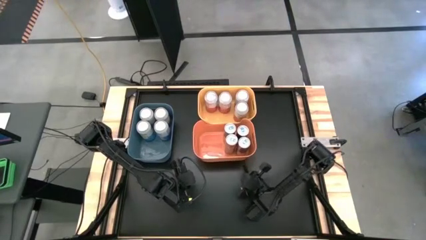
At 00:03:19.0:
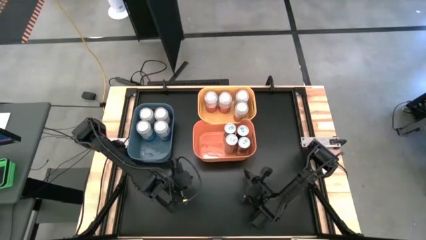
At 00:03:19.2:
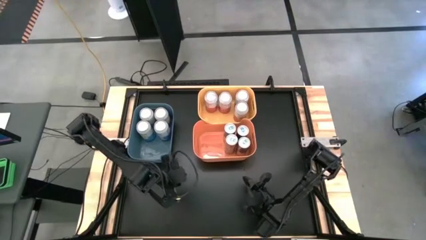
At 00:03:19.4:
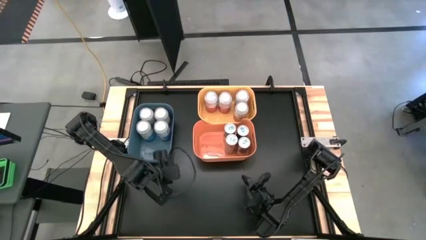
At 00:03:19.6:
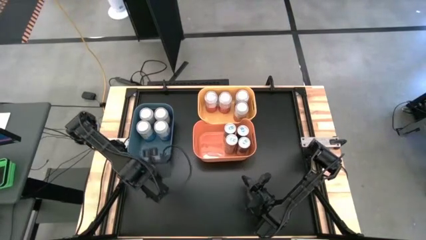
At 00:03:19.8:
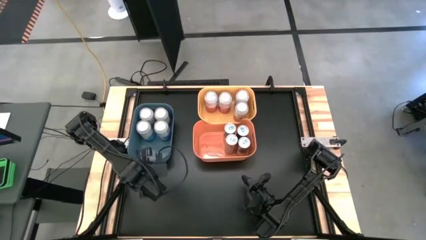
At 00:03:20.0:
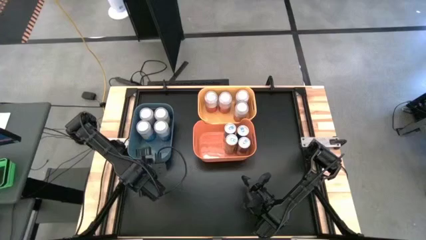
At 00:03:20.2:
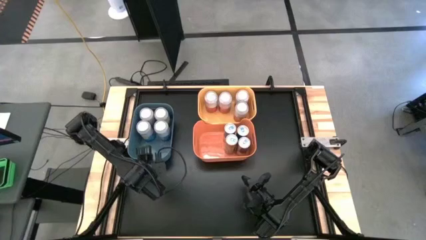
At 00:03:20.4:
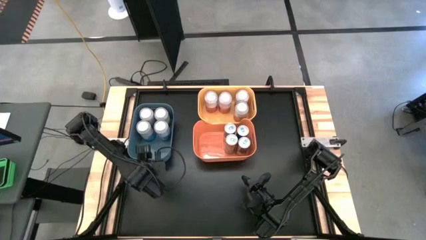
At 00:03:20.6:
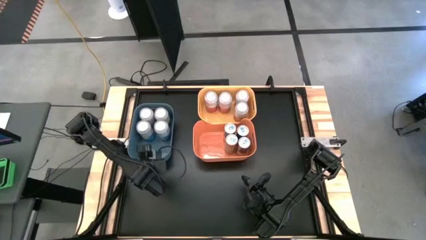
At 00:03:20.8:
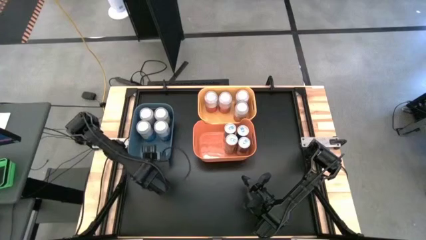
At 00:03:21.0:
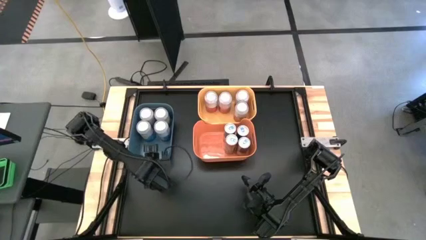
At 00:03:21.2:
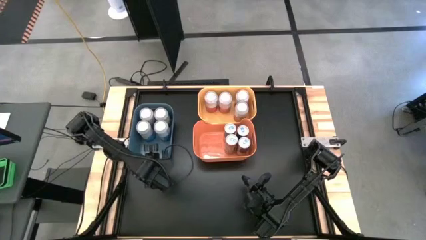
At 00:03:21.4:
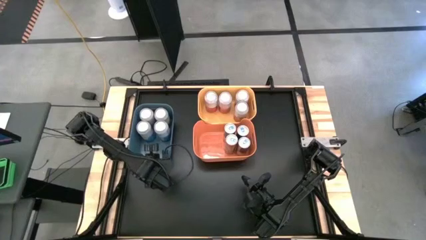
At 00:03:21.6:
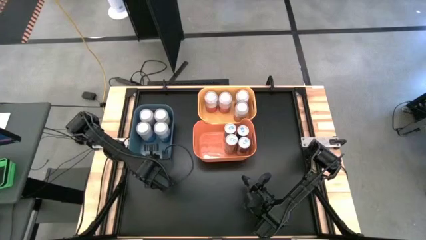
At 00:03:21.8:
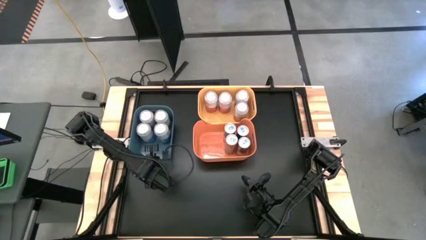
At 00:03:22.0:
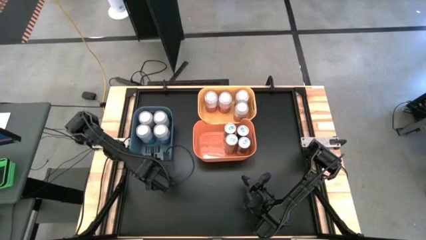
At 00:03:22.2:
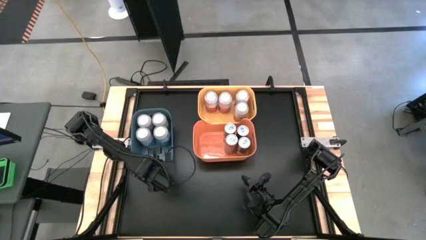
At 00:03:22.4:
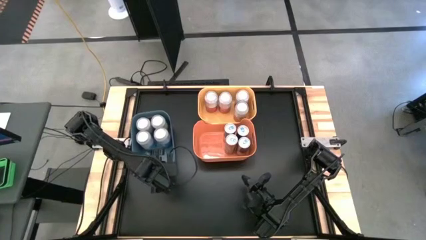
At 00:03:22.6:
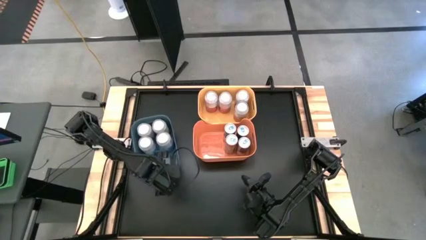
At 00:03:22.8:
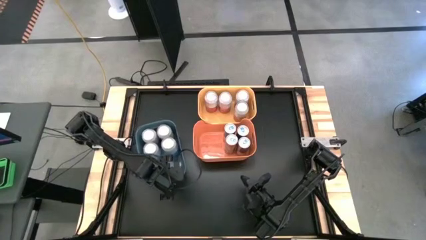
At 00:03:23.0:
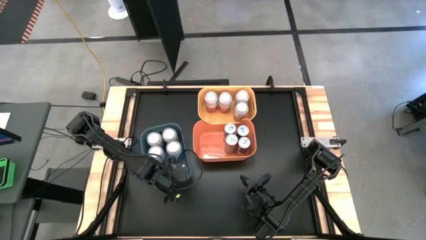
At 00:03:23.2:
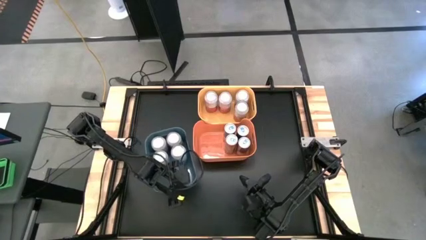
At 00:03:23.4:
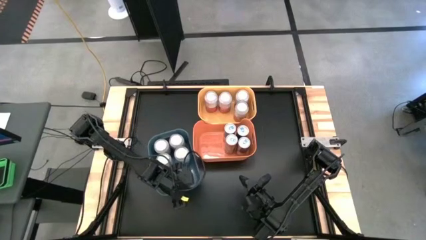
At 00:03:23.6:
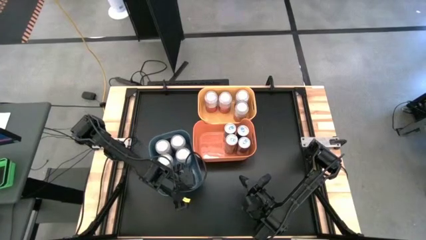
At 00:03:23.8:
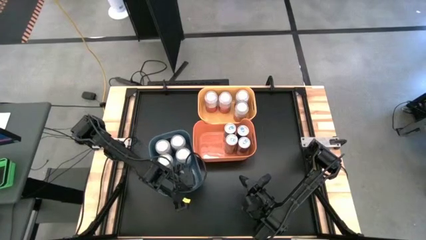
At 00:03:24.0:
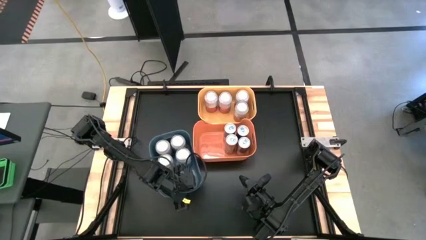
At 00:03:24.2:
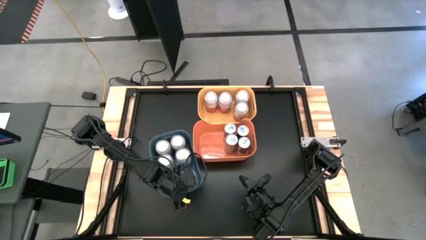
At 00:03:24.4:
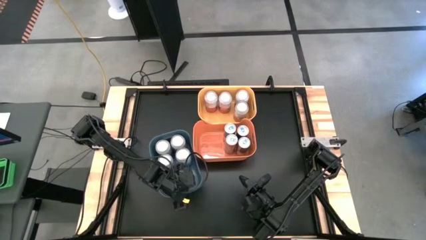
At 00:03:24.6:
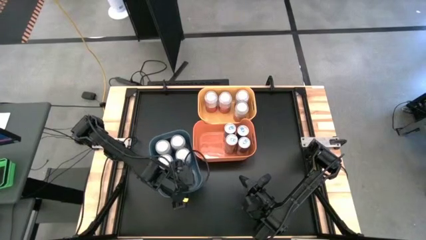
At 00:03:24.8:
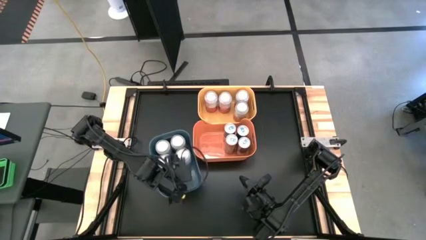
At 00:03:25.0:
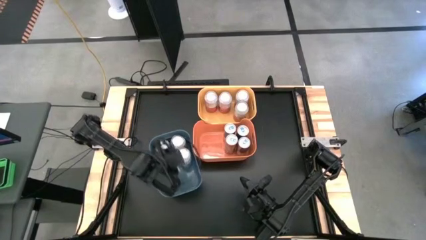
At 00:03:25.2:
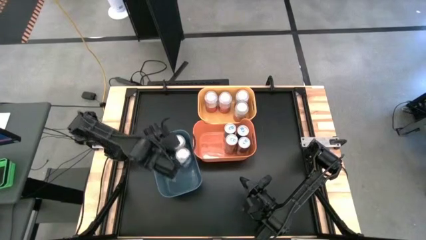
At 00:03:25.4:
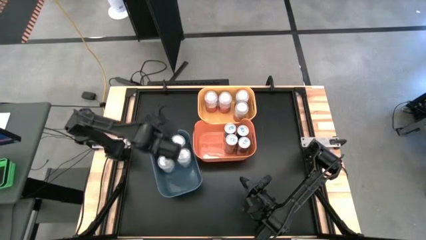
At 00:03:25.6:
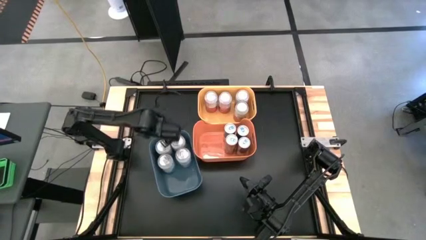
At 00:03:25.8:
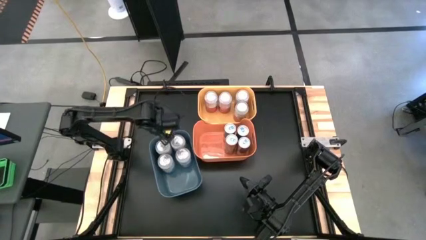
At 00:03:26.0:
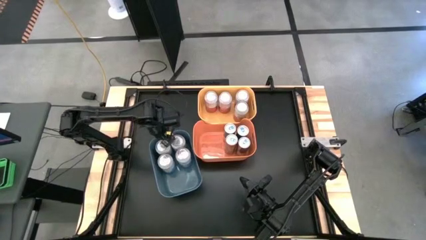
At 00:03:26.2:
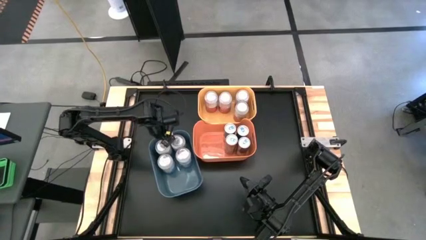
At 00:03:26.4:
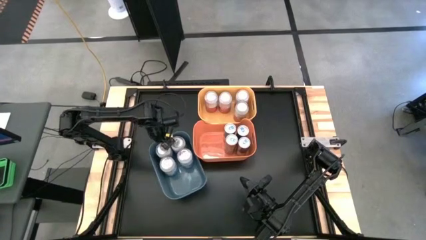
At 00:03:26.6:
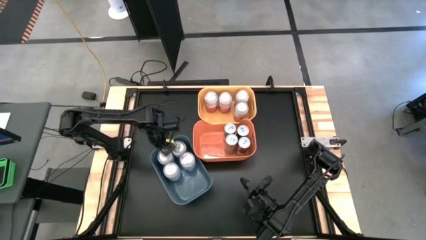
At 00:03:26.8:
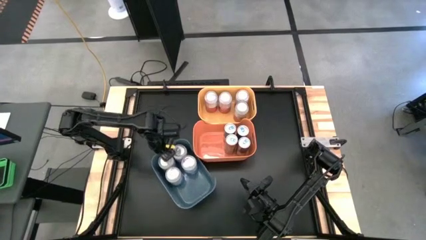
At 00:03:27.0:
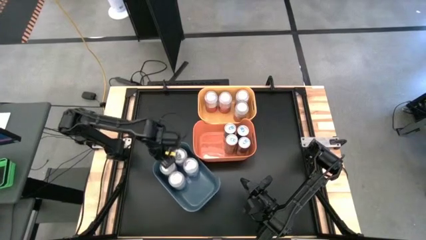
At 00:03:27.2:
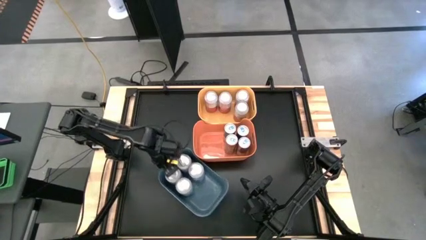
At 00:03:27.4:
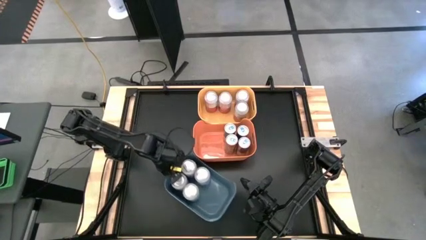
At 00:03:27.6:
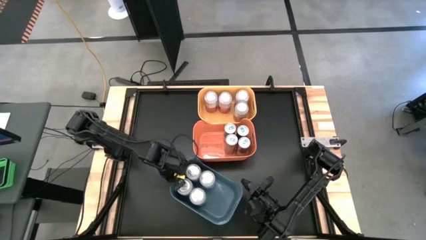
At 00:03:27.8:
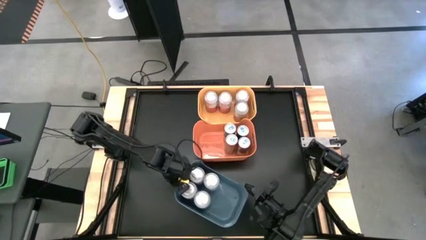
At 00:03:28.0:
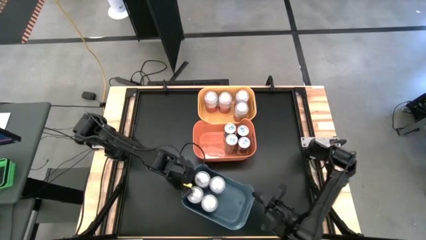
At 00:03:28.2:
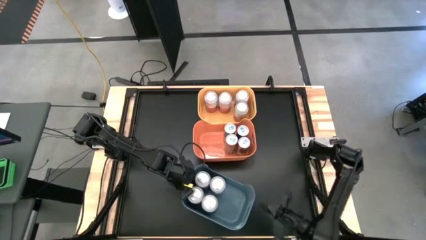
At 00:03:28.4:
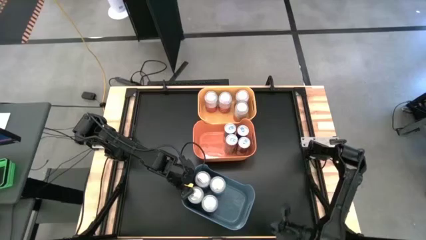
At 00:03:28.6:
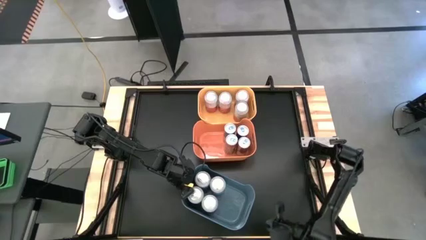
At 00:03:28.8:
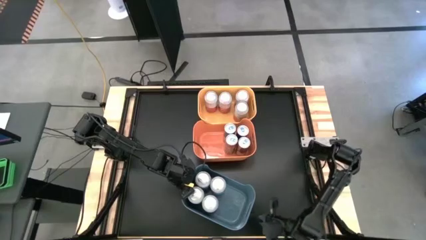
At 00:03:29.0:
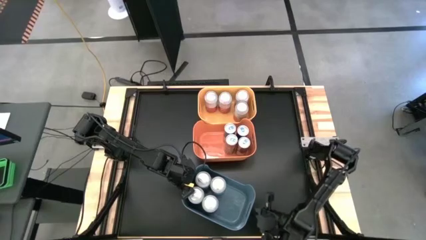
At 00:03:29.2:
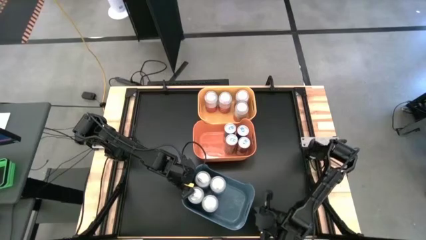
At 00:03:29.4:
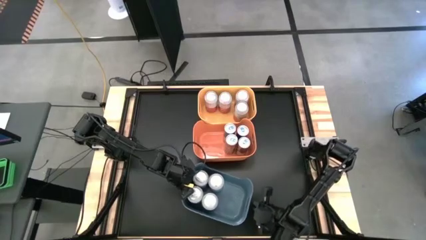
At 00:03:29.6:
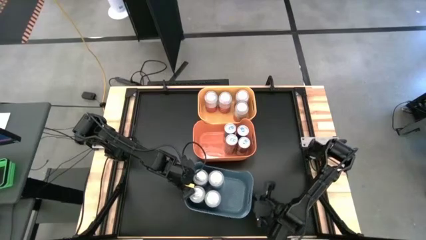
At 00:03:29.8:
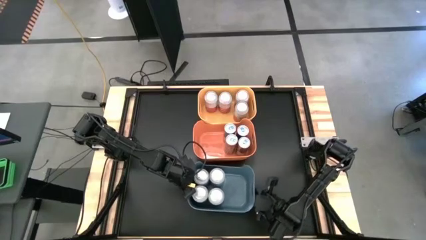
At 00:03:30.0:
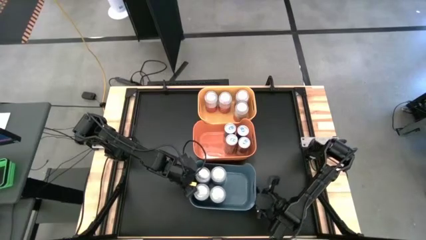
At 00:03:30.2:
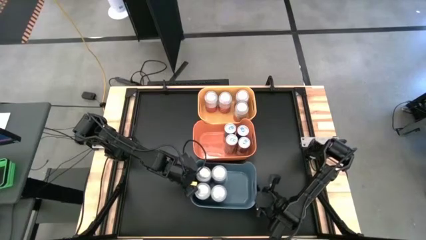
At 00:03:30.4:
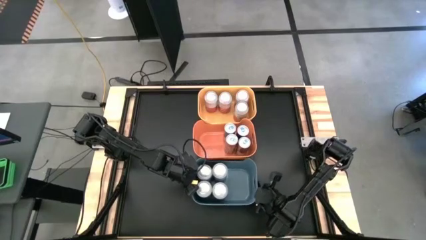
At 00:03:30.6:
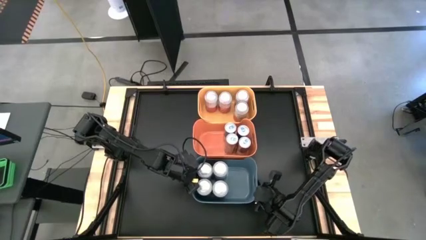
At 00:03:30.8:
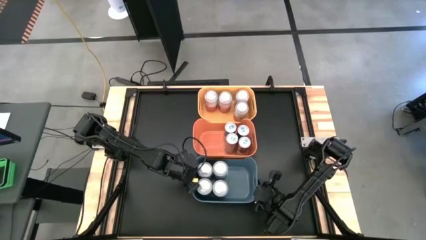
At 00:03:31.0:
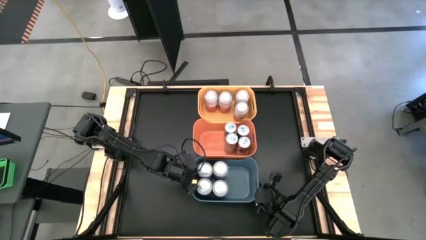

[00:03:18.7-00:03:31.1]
Task: Sort soda cans
Move the blue bin

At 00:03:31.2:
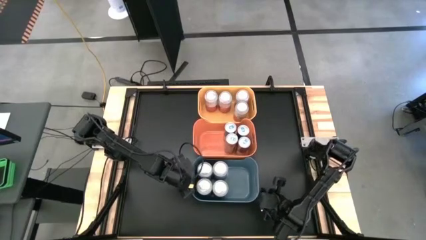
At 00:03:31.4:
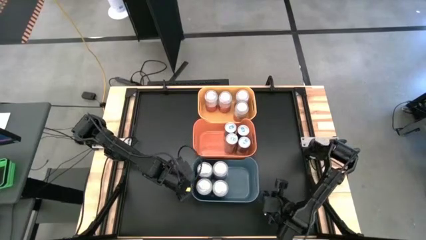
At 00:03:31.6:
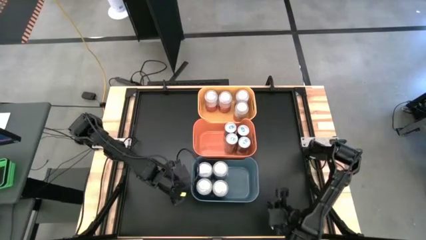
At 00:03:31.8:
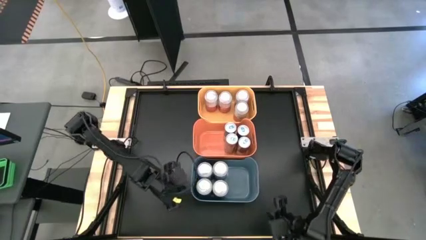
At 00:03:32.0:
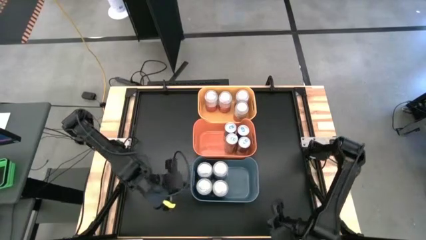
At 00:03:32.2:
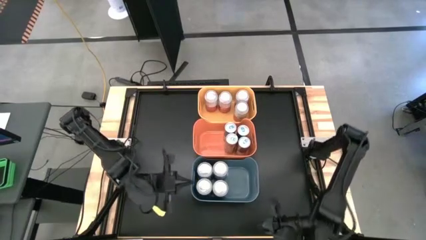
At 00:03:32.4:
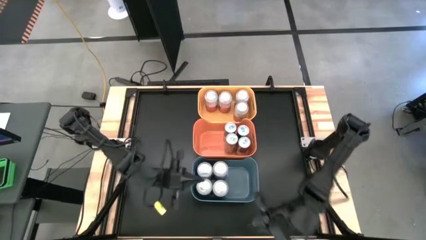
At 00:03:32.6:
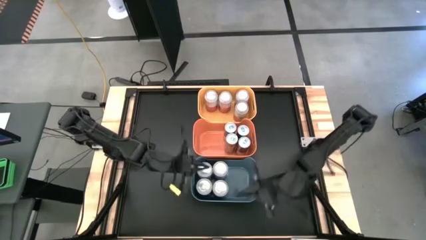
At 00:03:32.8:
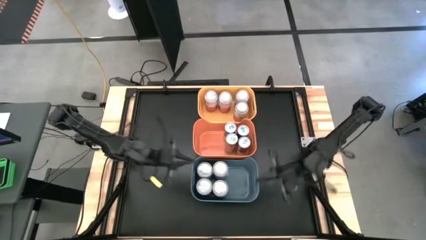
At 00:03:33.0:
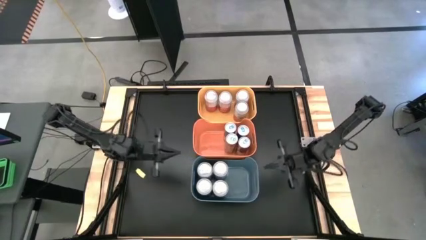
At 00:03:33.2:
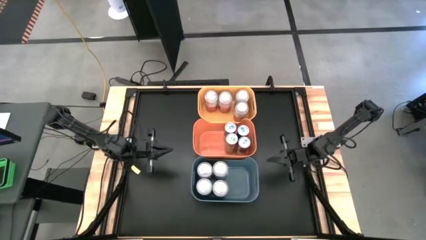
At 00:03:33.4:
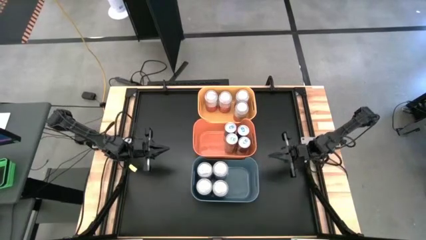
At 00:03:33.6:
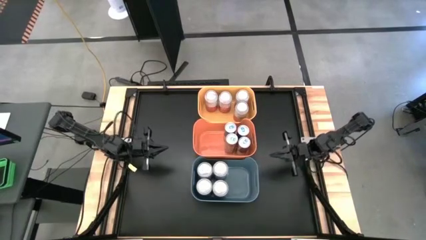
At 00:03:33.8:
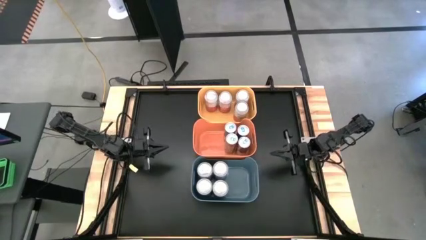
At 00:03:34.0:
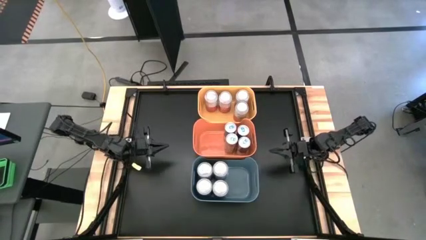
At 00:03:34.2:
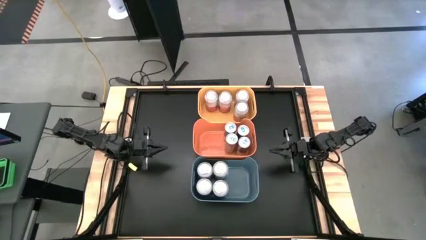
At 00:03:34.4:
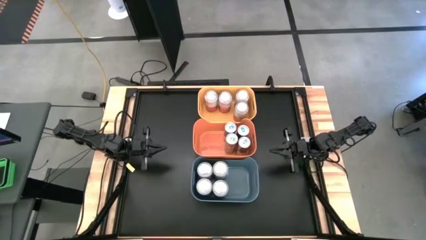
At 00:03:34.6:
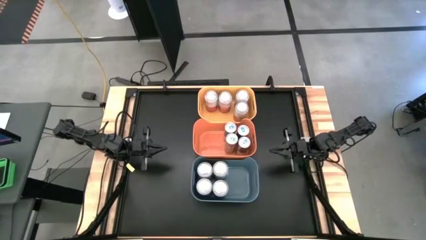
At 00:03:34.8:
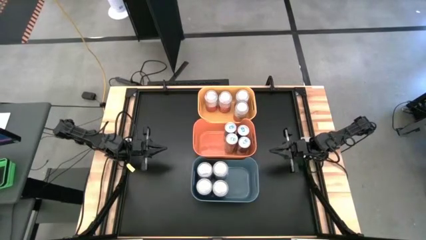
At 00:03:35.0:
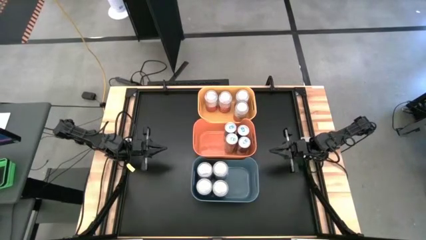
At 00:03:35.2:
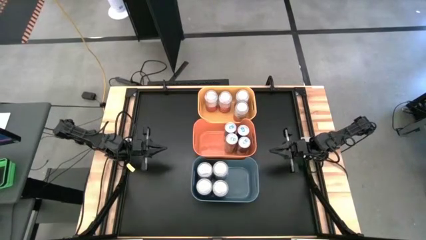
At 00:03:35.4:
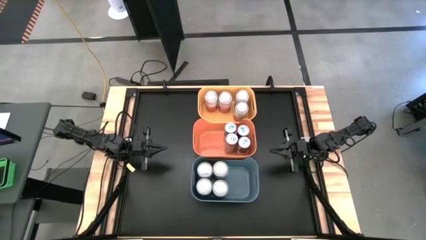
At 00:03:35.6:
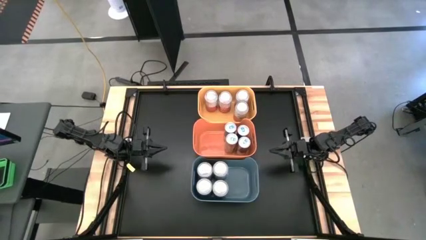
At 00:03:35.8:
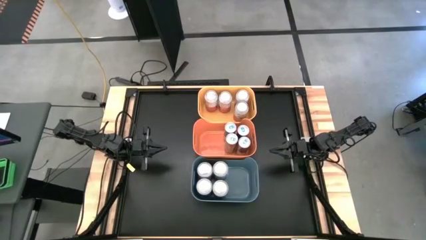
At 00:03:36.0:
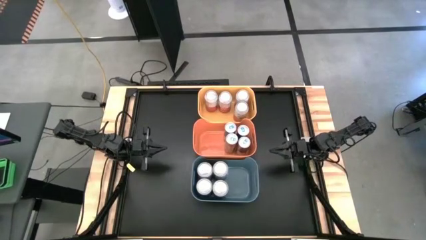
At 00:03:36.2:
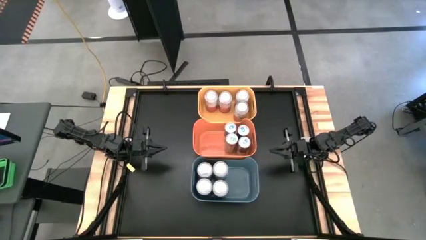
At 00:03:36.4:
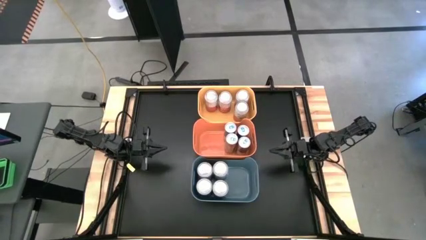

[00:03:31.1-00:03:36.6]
Return to Home Position
